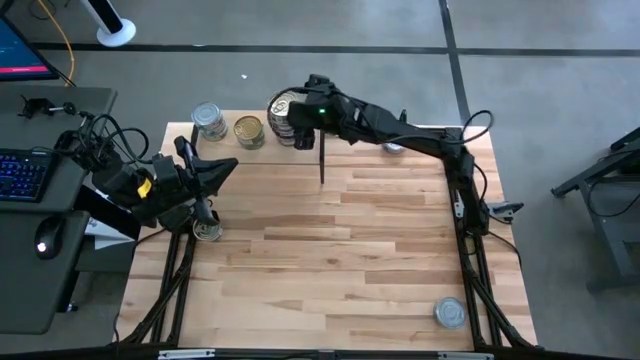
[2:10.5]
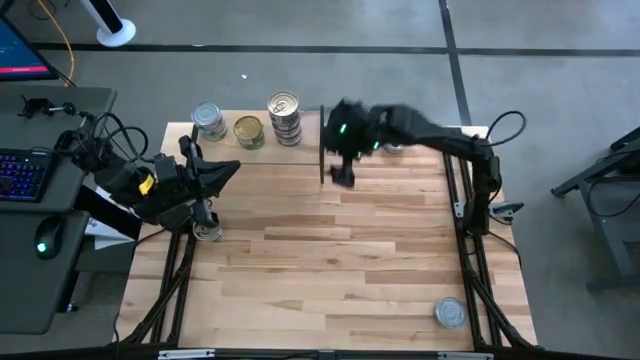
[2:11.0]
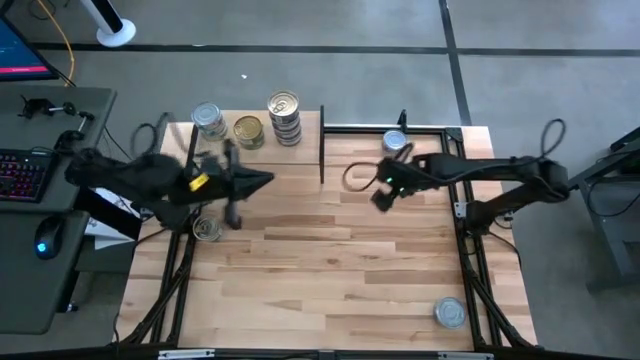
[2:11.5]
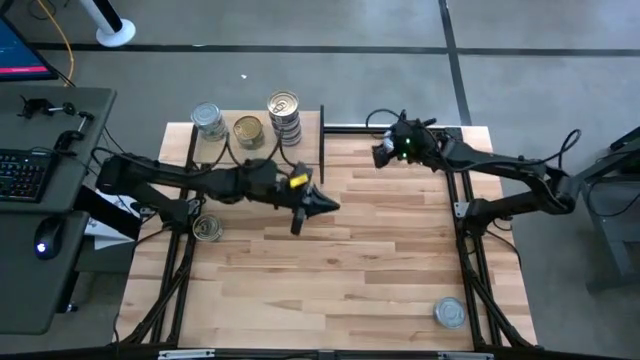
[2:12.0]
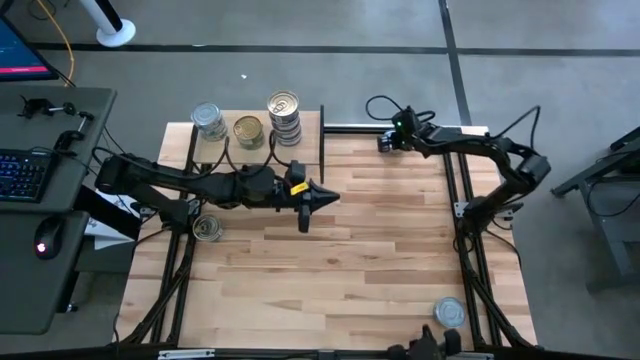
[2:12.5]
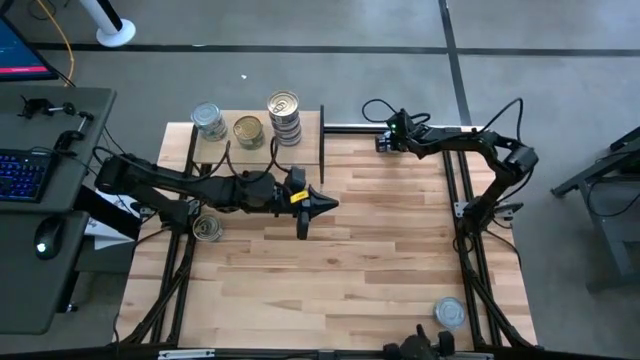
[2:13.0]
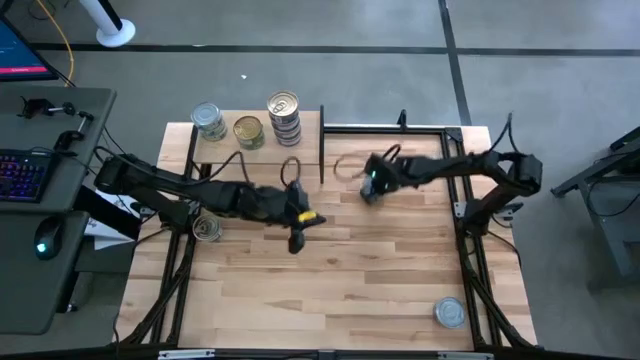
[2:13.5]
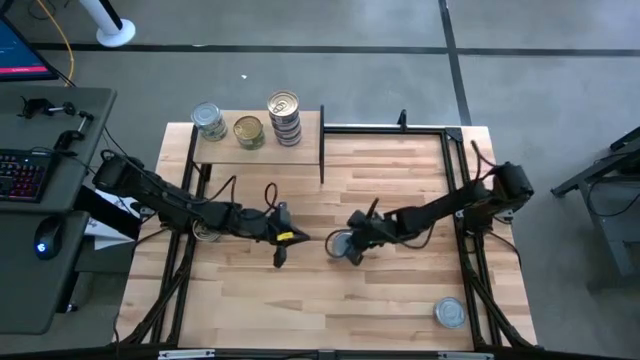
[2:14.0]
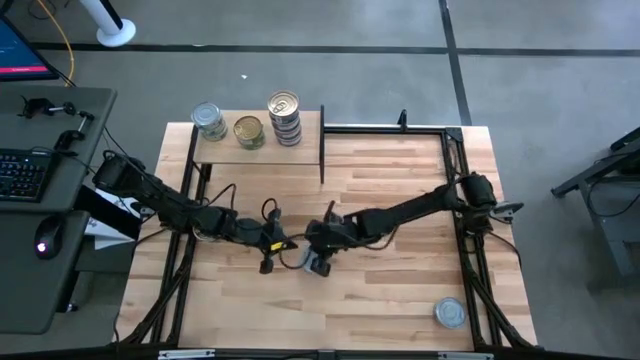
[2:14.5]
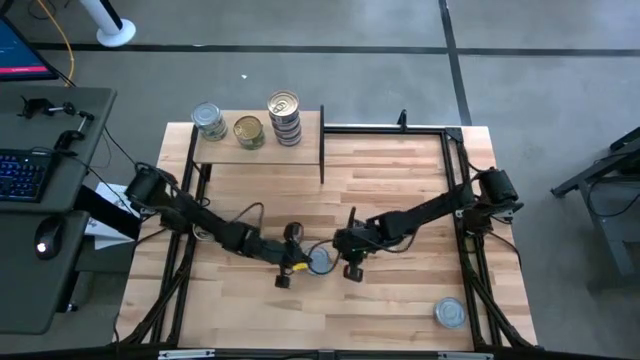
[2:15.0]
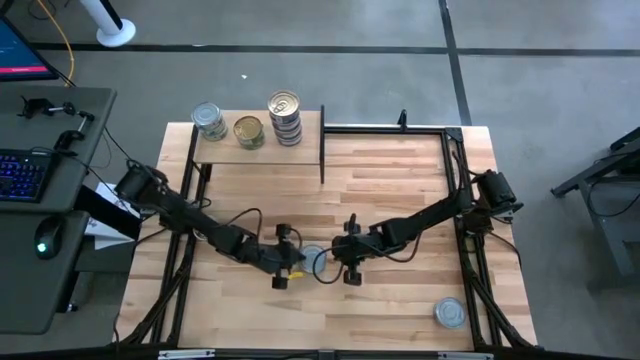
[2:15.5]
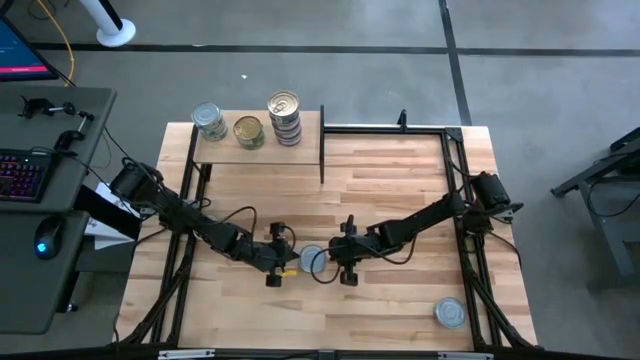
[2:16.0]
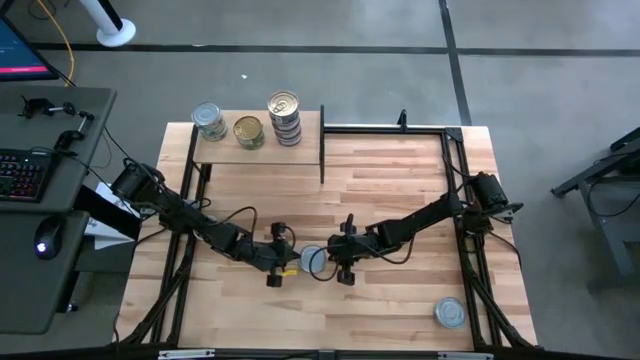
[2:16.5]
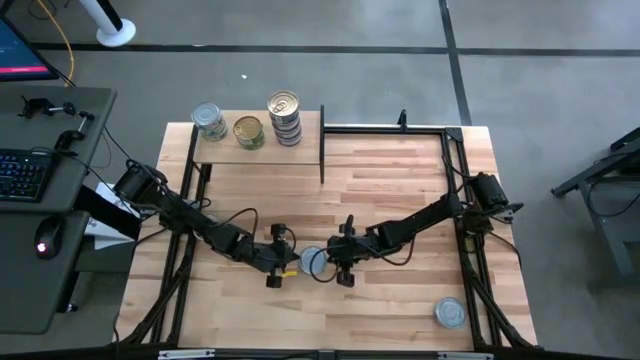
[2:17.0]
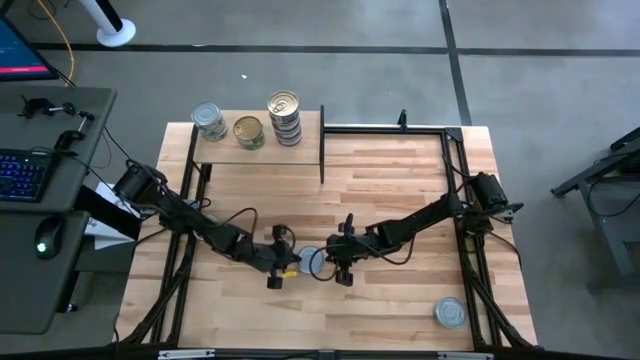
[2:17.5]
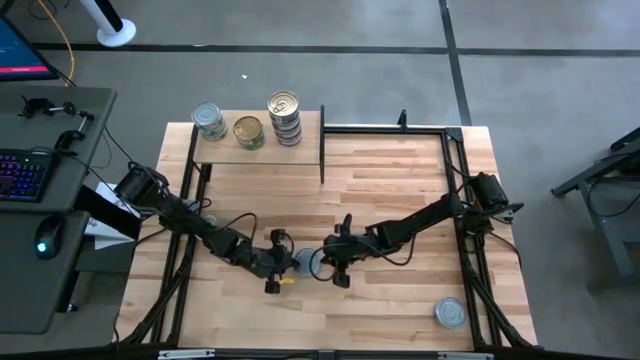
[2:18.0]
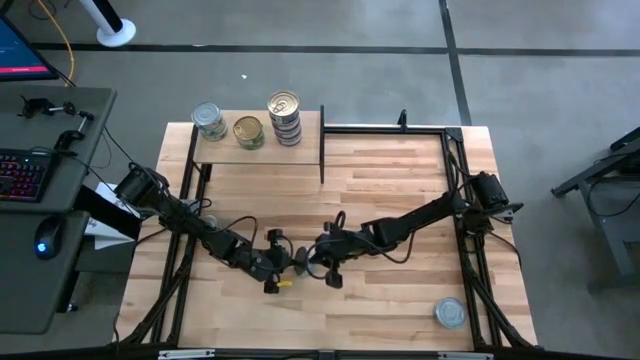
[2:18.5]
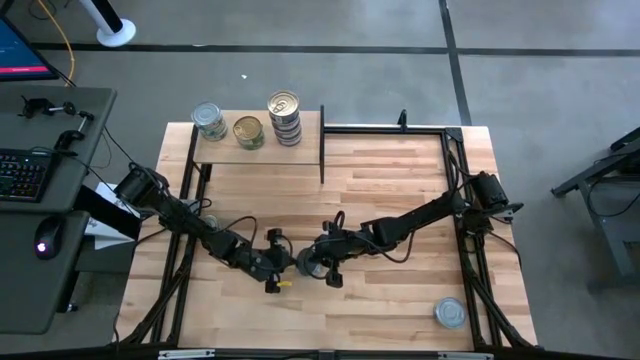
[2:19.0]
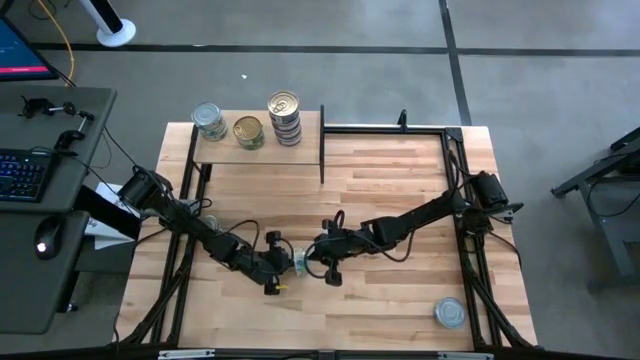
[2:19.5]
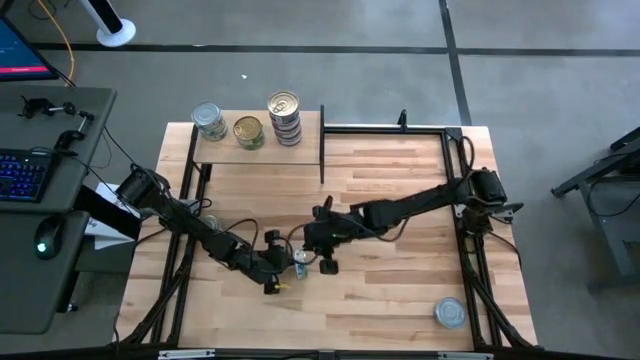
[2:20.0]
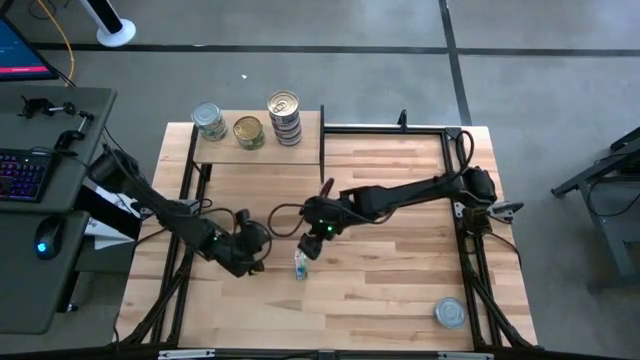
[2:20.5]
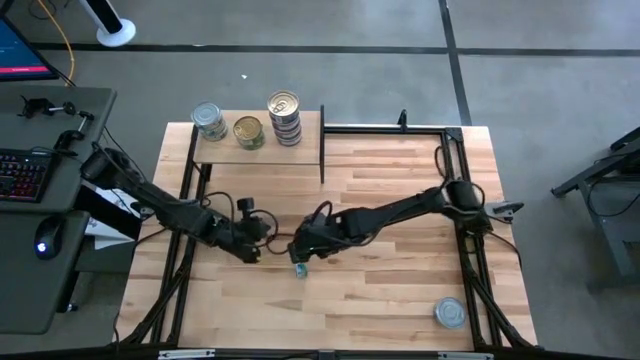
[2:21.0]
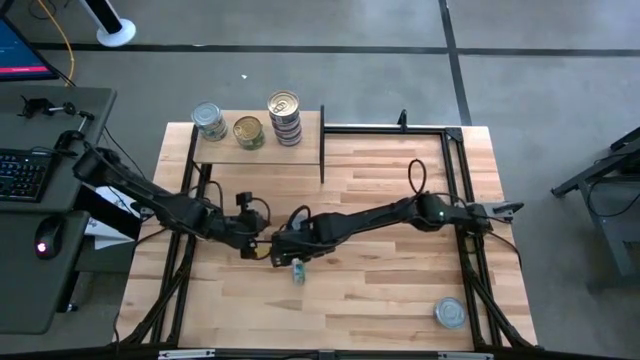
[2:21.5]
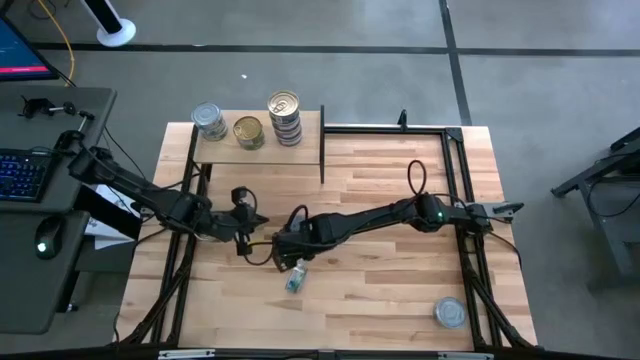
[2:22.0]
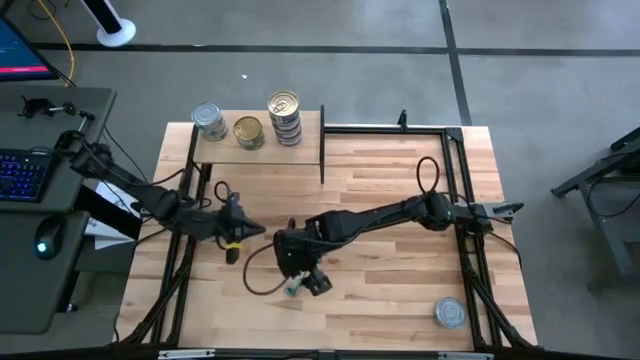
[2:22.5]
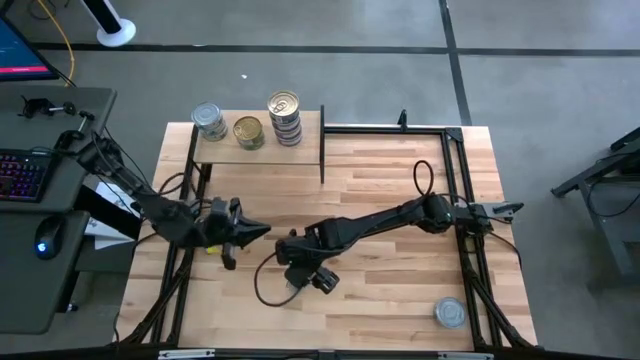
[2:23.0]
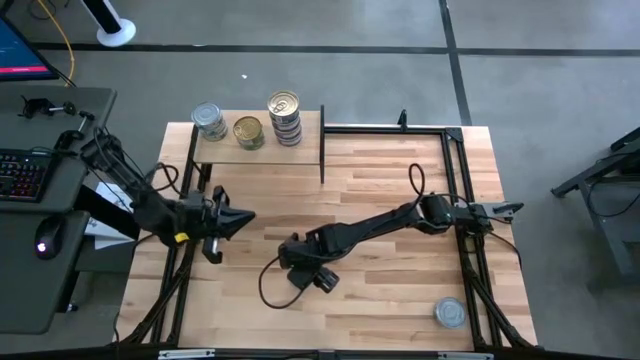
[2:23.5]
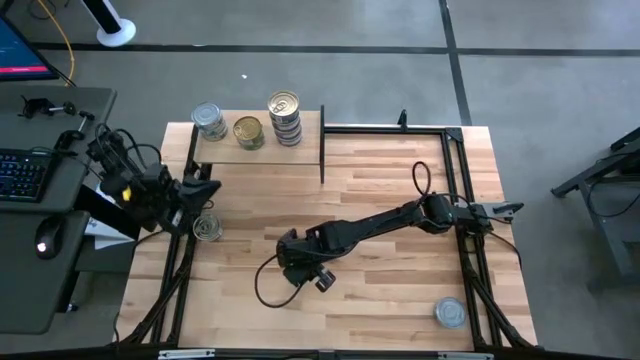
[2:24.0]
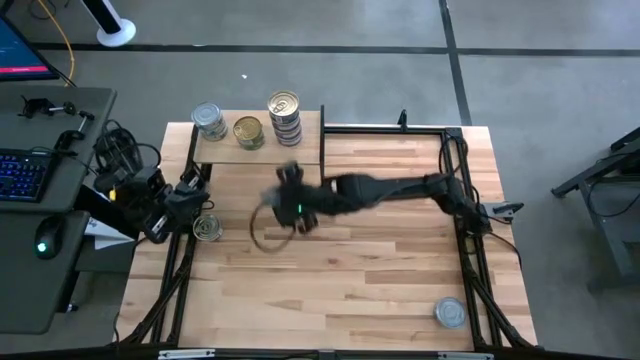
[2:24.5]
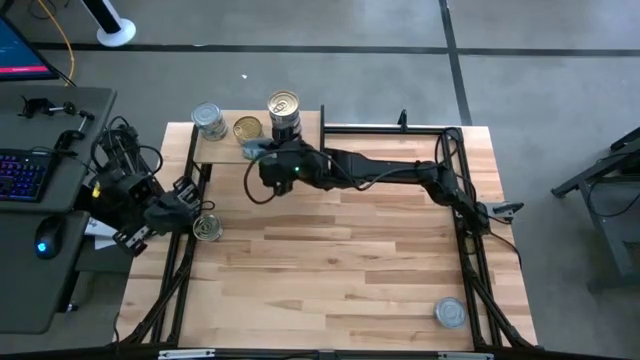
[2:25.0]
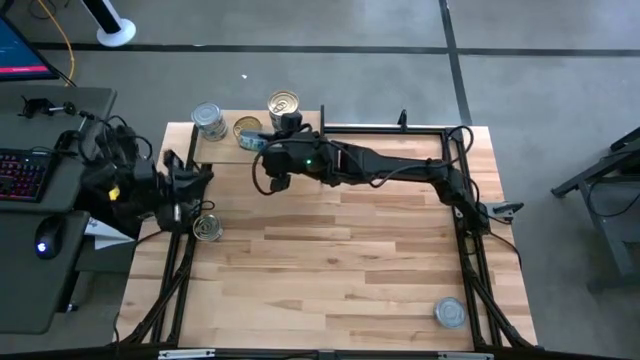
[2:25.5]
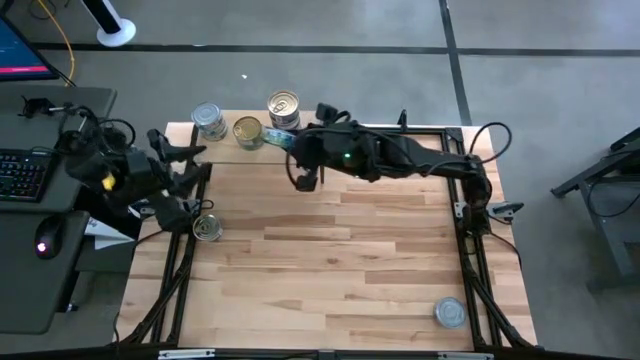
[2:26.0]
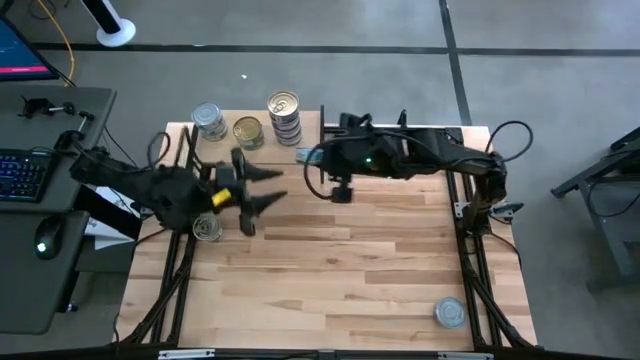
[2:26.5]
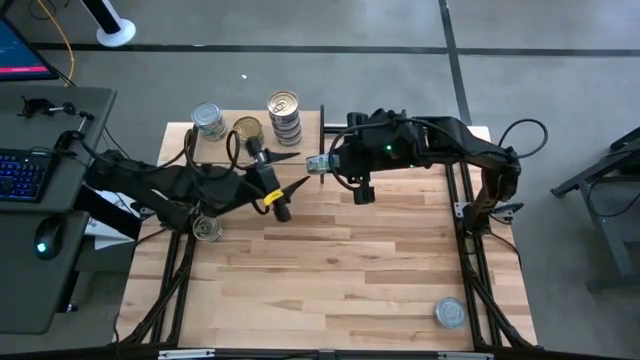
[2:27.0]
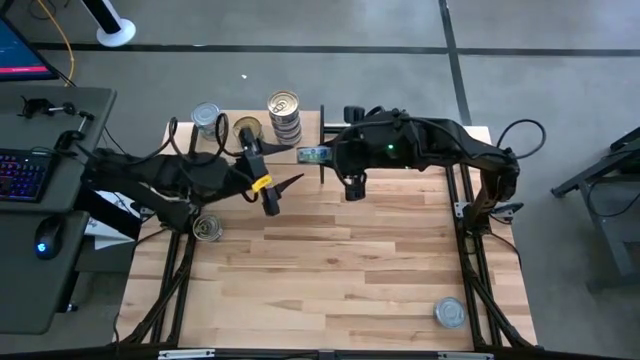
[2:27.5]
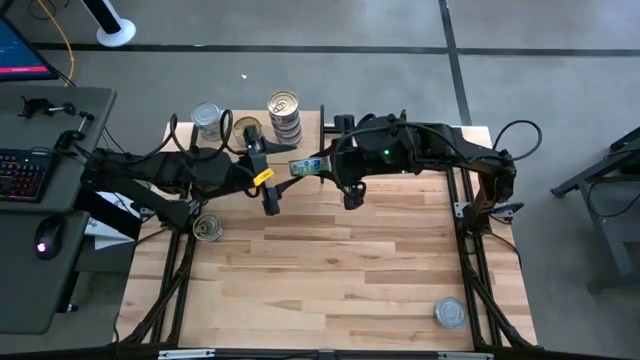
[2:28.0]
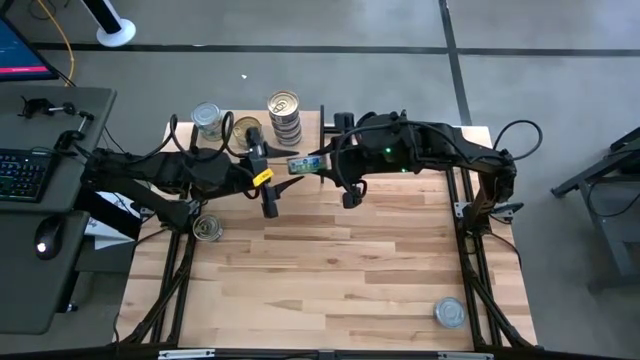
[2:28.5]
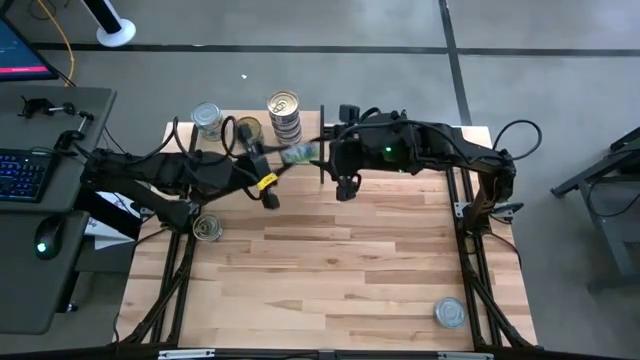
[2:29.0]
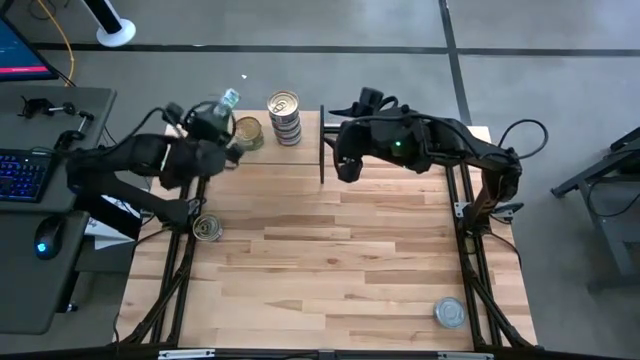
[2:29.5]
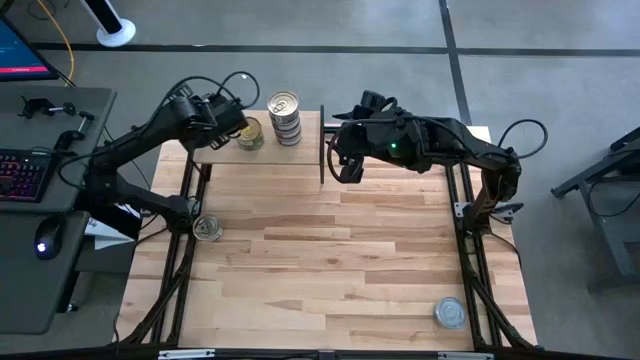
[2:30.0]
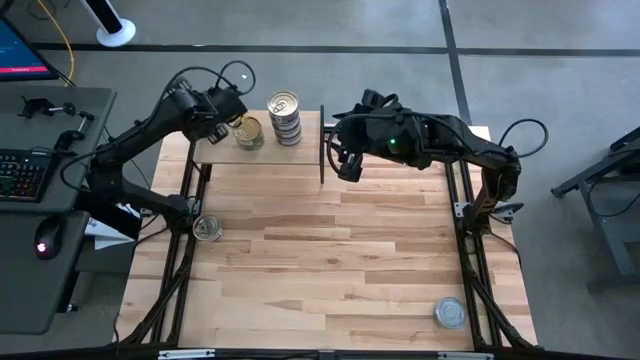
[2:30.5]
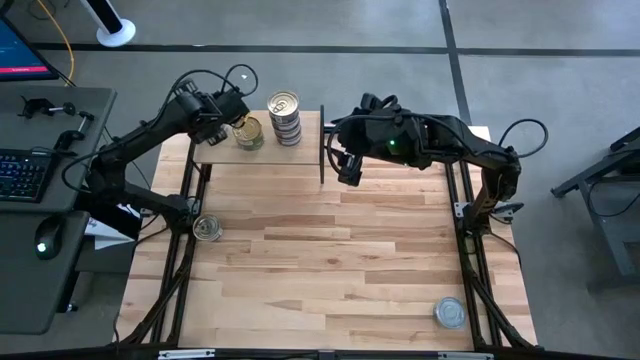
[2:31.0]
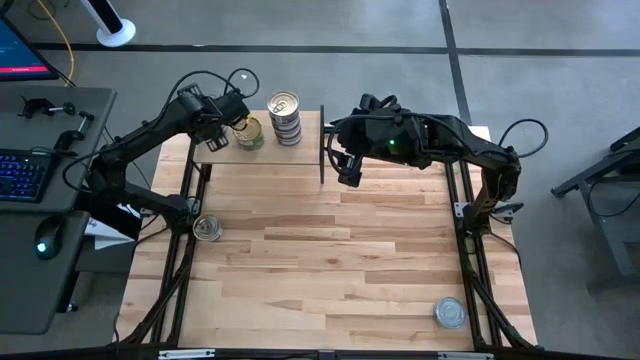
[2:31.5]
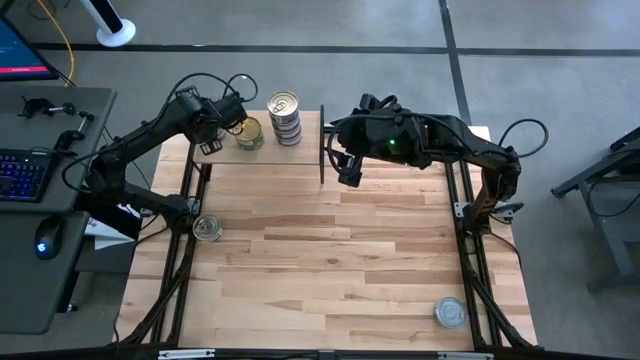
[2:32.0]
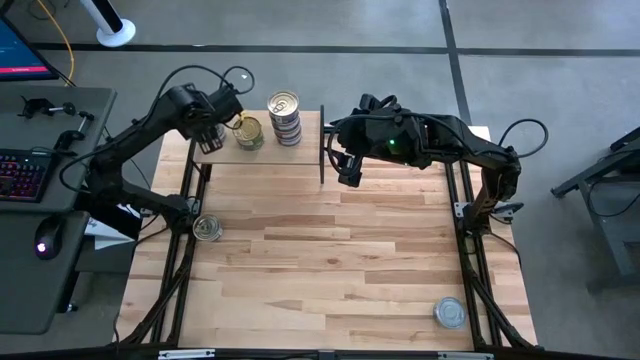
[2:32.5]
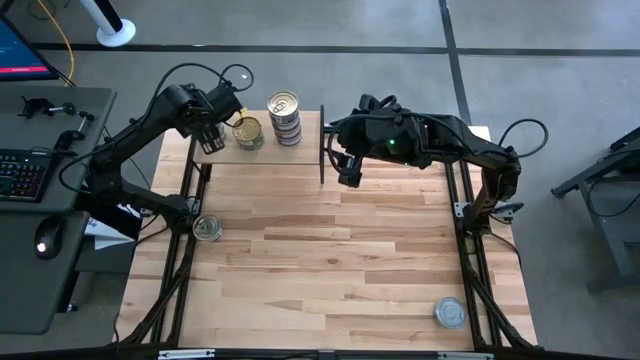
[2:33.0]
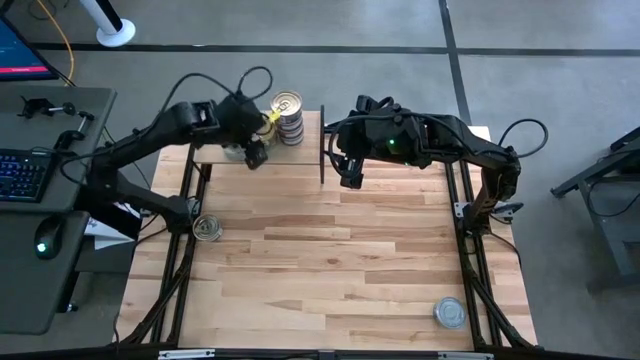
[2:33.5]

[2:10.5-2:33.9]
Task: Stack canned seafood by type on shelf
Stack the green-white tuna can on top of the green-white tuna cans on the shelf
